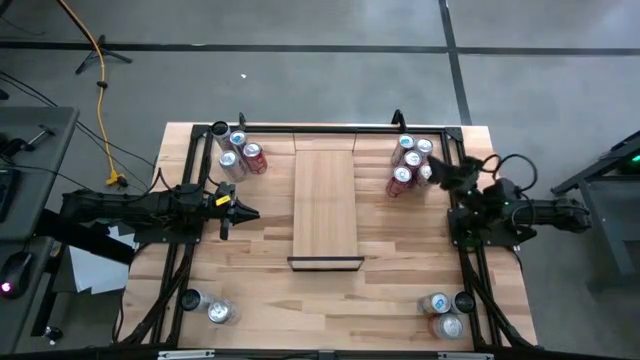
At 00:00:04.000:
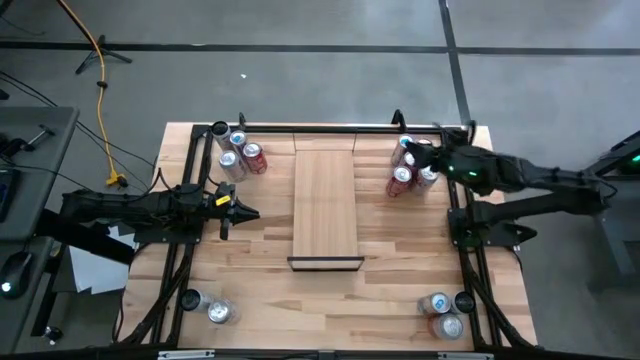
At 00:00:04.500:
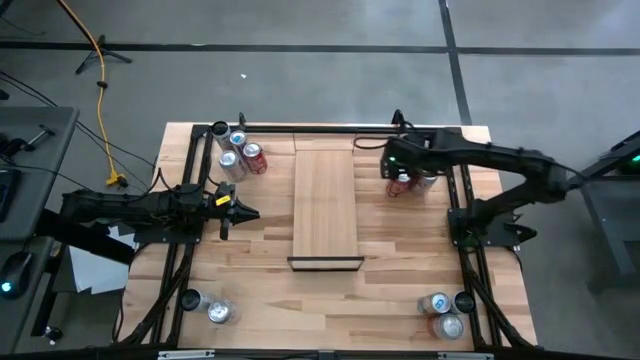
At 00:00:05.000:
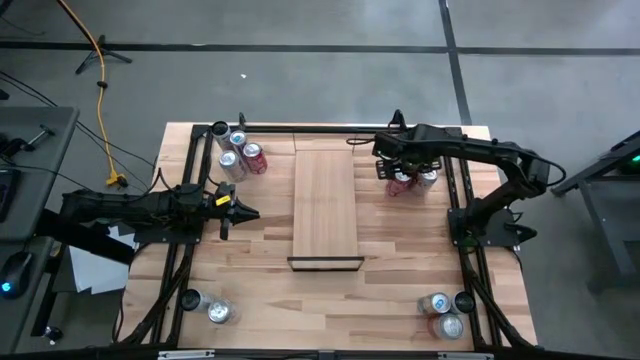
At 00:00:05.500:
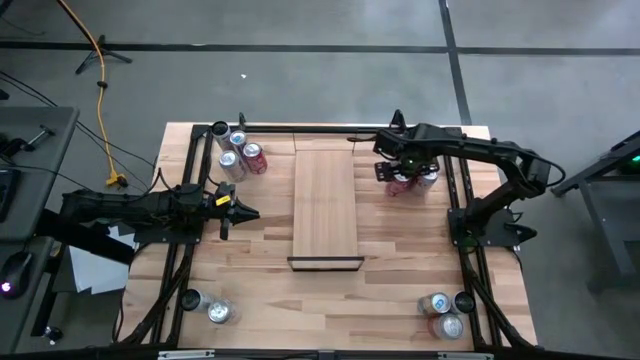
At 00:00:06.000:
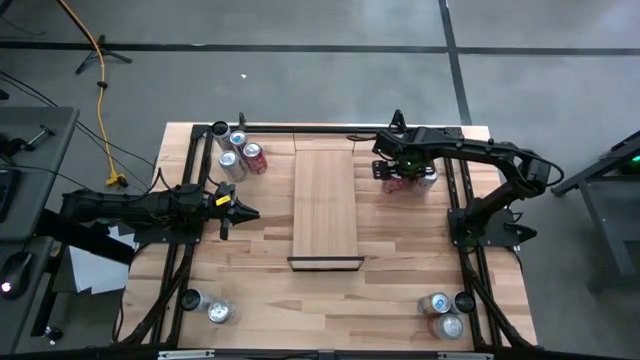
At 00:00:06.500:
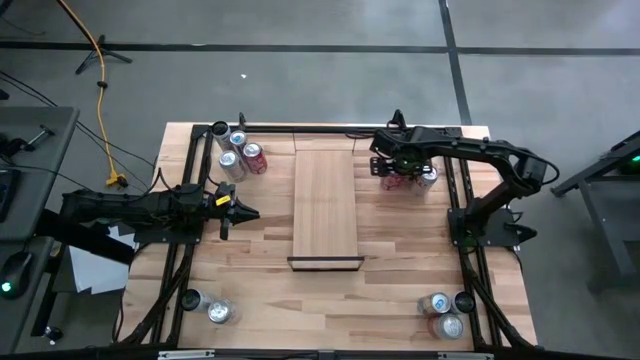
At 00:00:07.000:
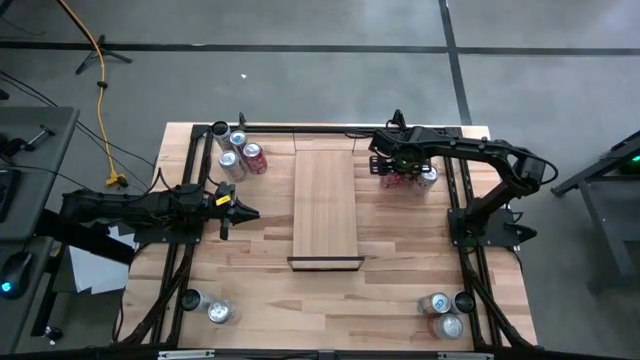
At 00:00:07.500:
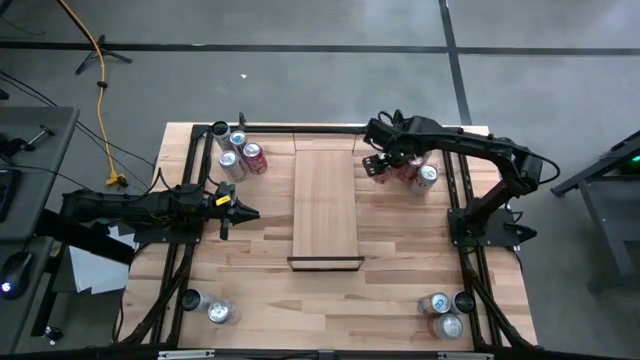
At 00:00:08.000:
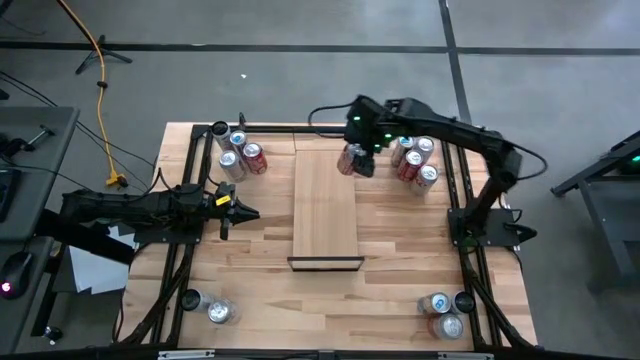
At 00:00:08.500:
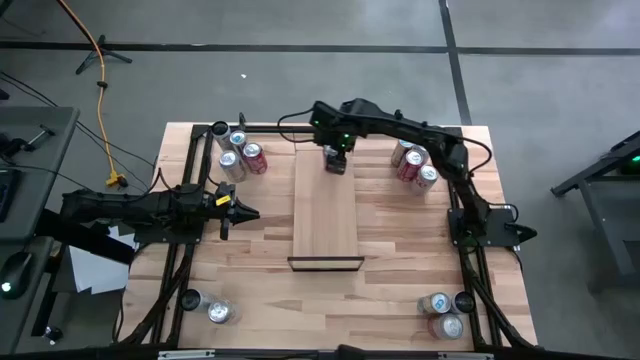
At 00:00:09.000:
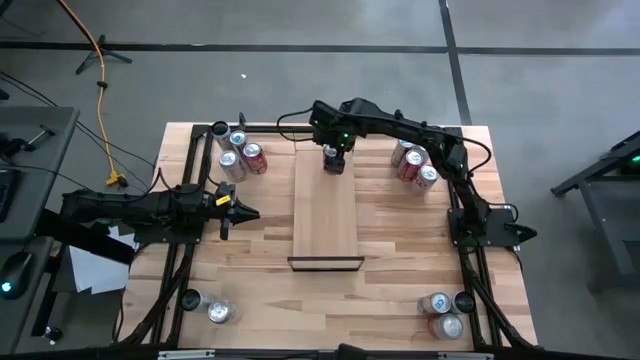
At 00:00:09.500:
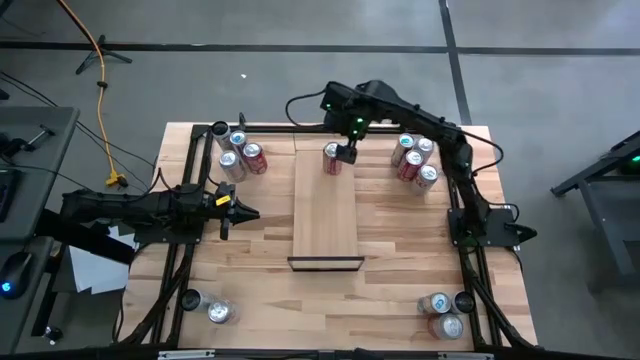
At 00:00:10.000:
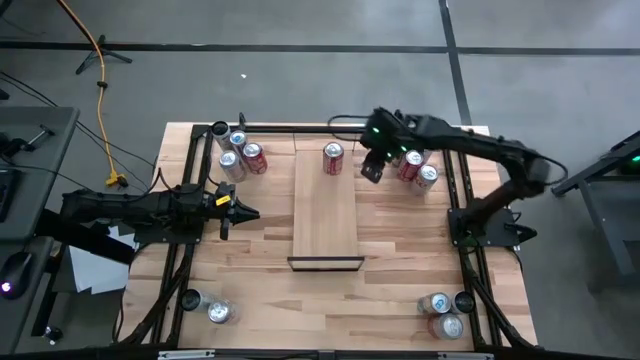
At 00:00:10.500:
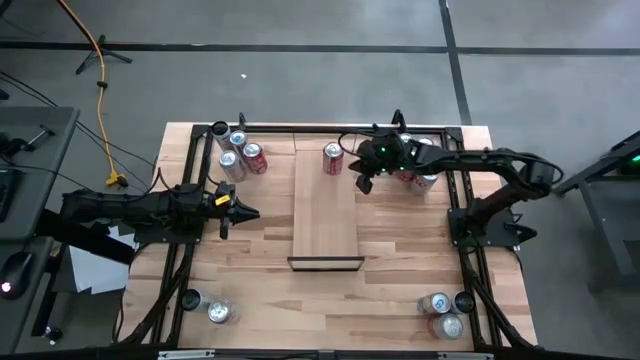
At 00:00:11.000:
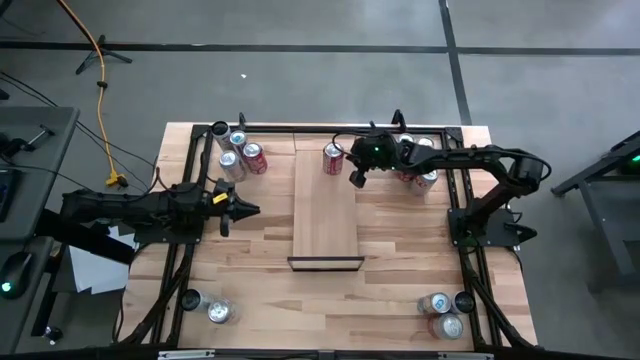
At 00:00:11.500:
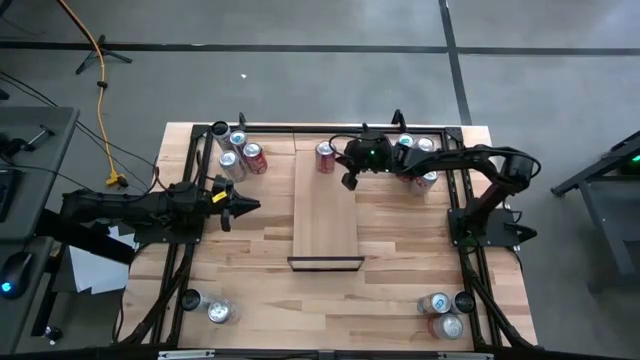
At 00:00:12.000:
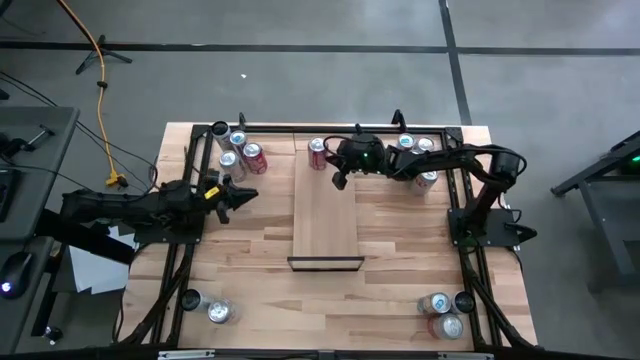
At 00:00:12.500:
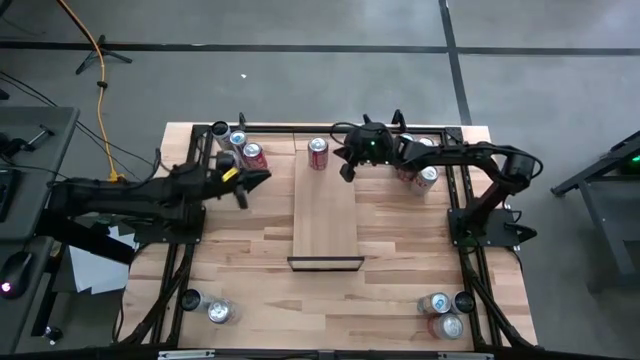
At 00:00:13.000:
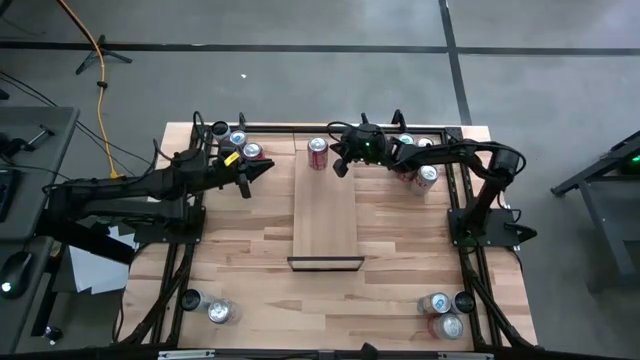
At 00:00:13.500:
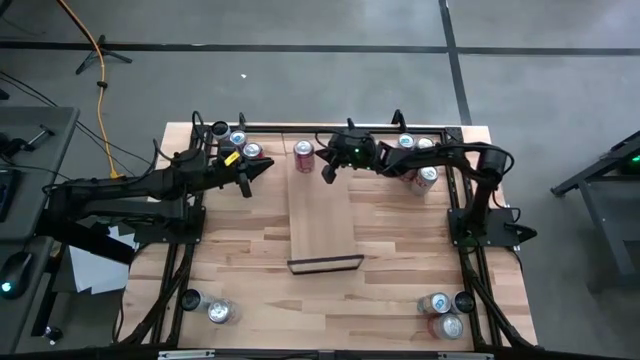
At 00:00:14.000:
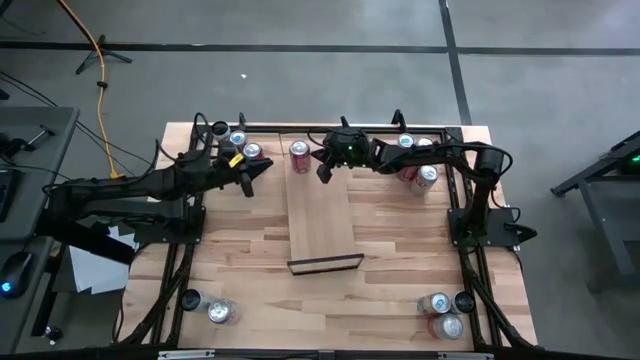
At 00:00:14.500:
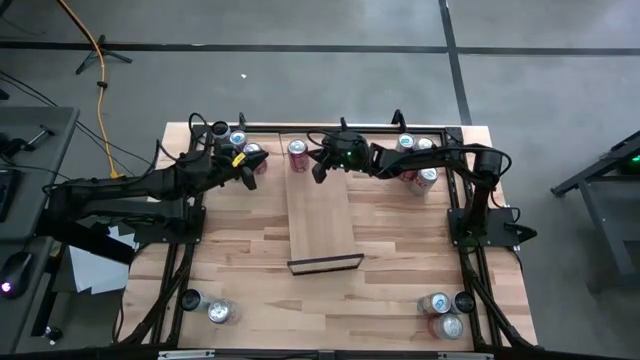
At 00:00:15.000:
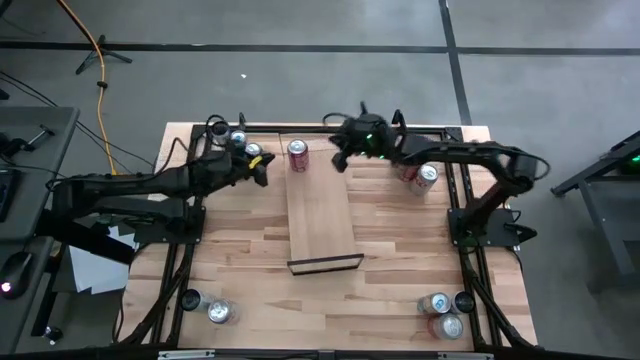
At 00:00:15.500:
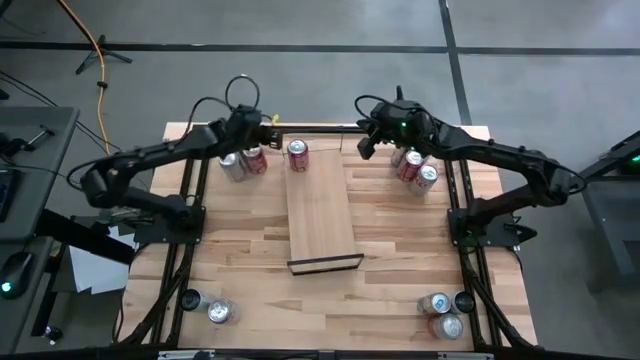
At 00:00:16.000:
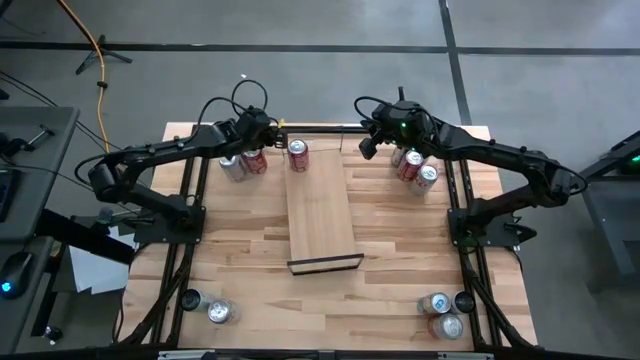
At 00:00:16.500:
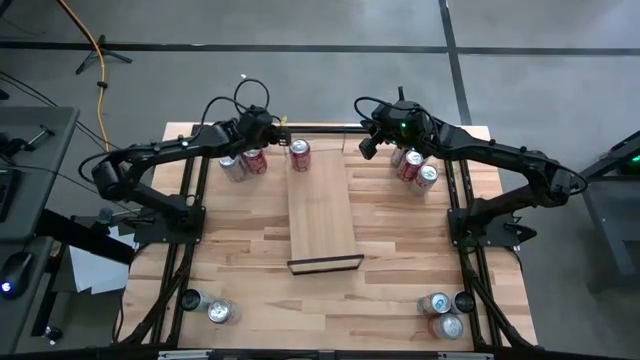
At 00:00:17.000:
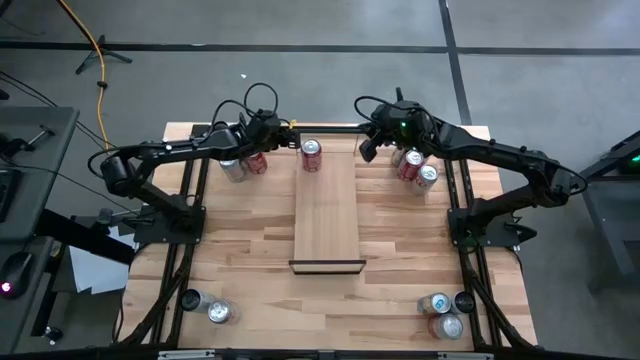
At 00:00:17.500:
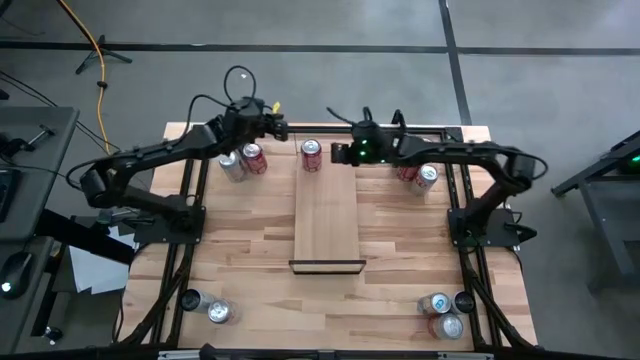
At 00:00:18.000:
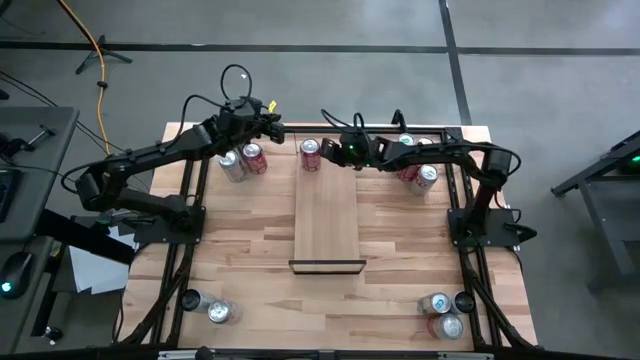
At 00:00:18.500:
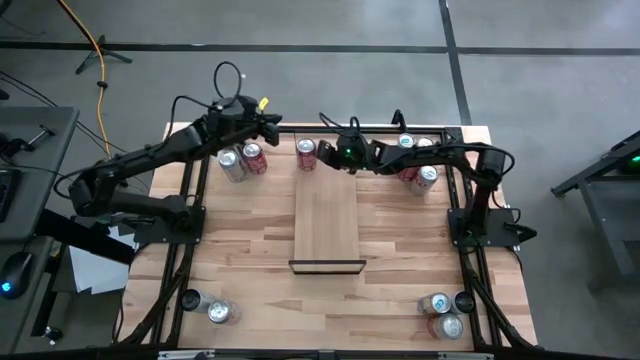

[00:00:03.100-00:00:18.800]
Task: Place canned beverage on shelf
Put the bottom right red soda can on the shelf

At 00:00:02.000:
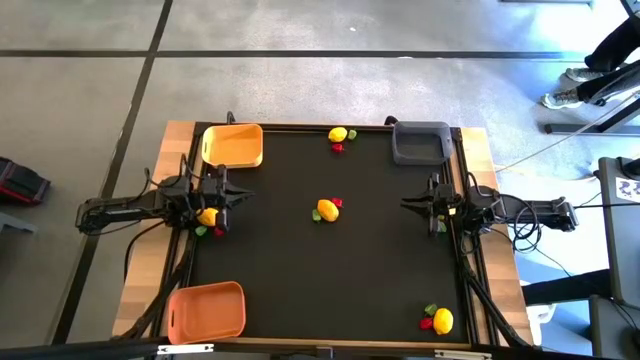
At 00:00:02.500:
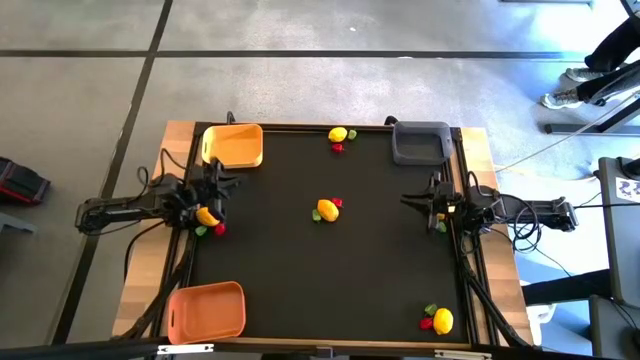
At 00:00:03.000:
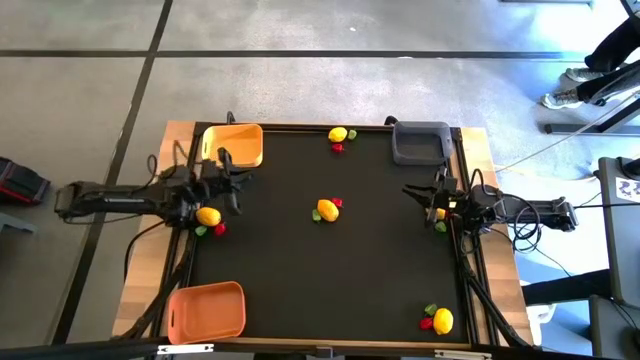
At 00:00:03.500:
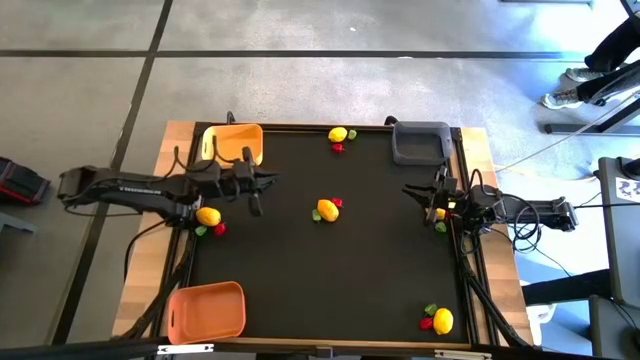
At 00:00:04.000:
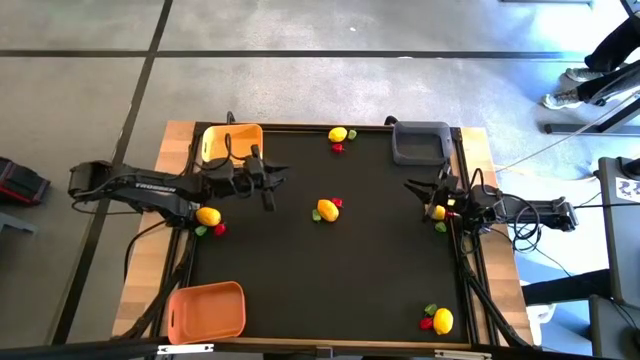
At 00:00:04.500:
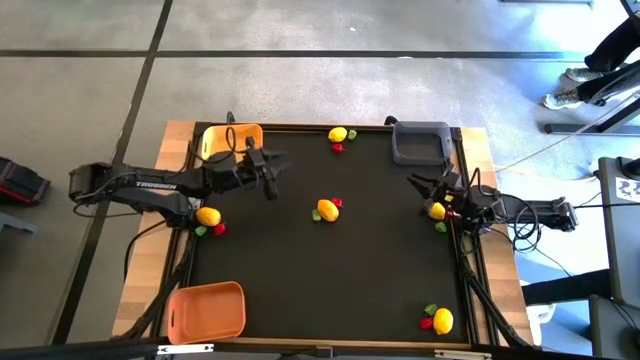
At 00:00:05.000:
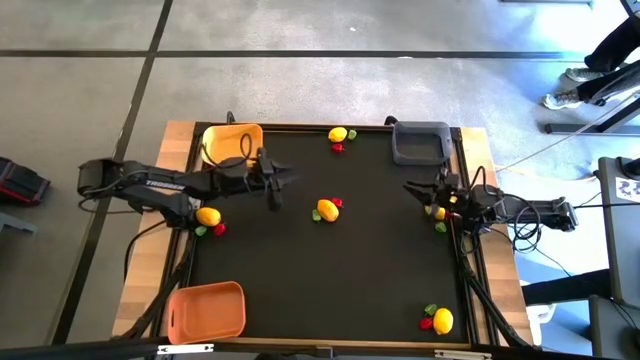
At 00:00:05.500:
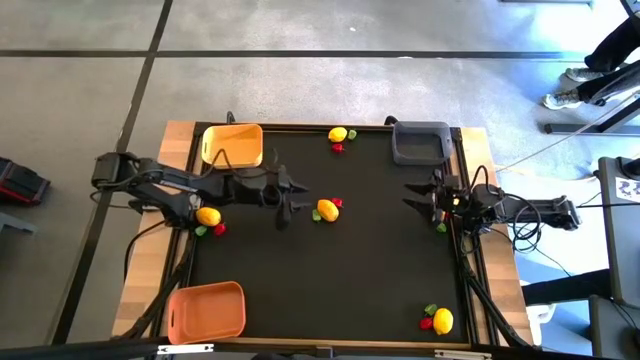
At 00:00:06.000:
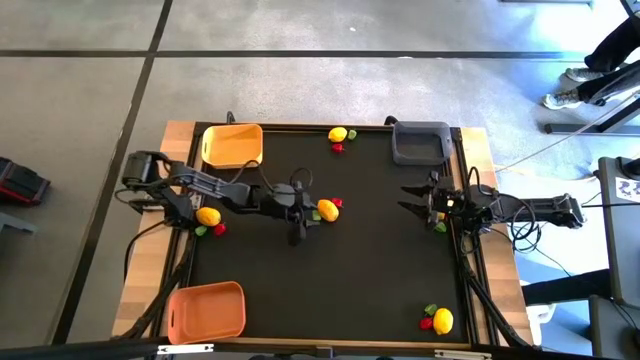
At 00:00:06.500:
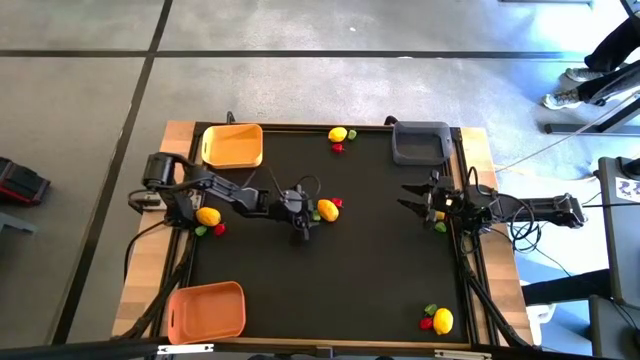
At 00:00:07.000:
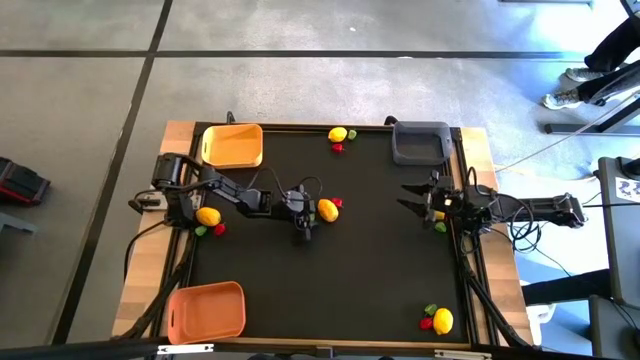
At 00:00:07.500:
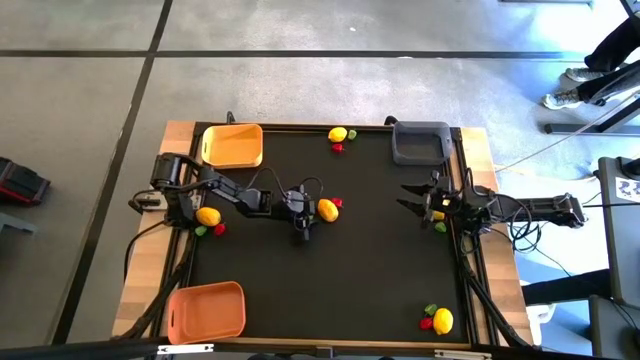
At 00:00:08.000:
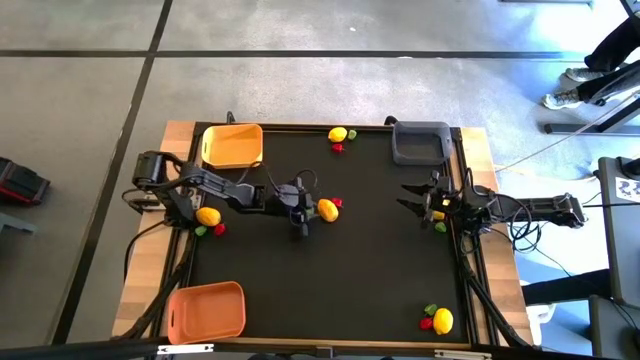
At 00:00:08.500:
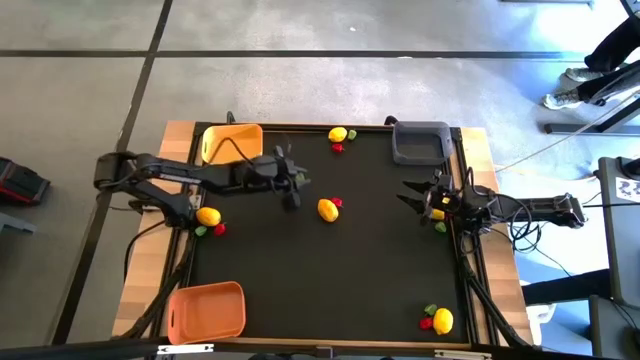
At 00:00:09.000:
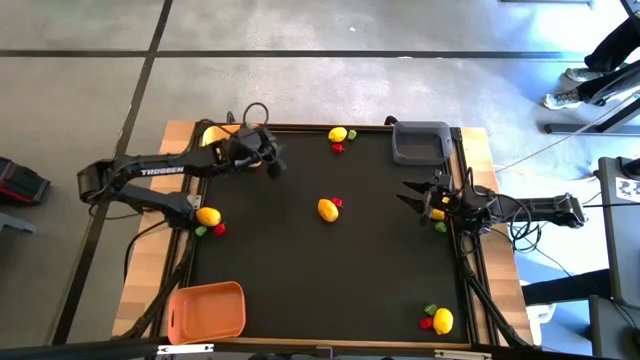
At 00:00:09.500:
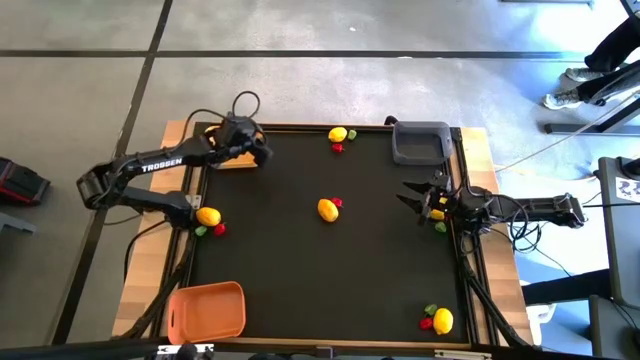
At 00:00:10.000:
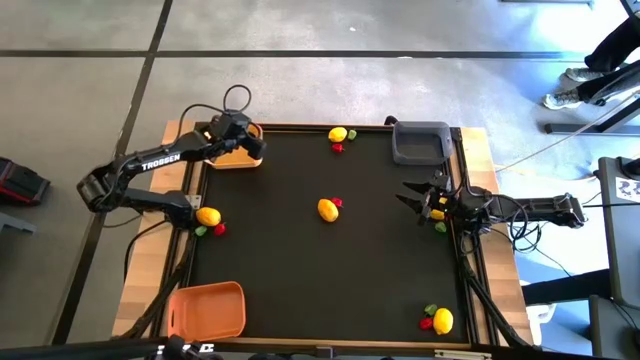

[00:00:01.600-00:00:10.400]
Task: Sort produce into baskets
Put the green bell pepper into the yellow bin
